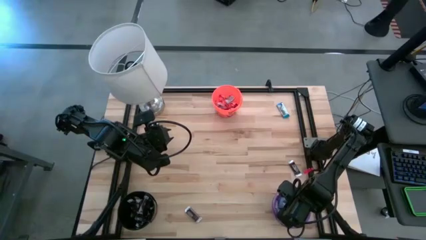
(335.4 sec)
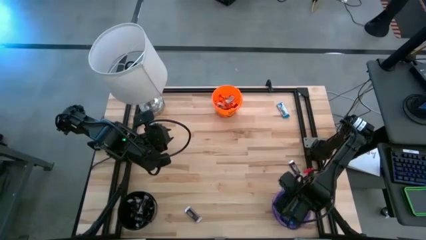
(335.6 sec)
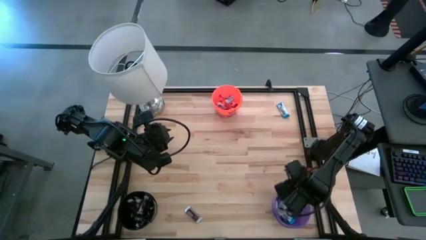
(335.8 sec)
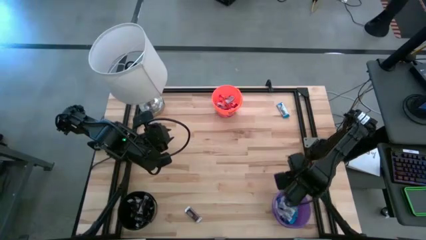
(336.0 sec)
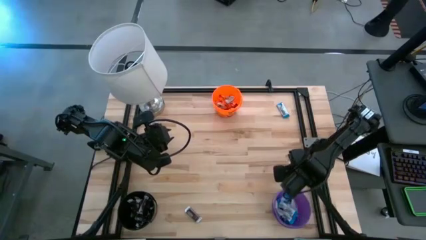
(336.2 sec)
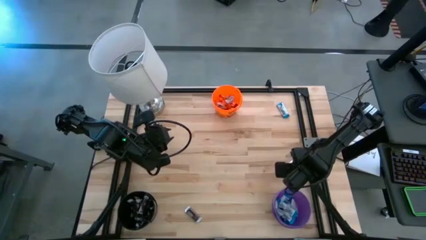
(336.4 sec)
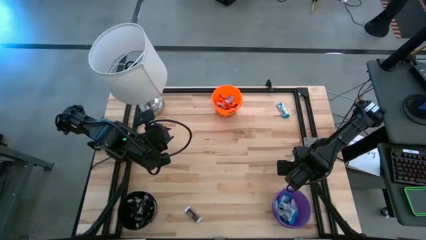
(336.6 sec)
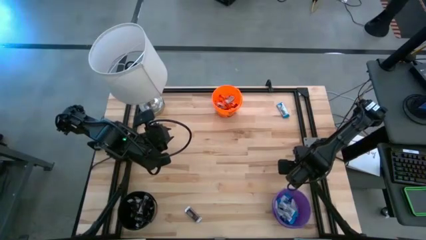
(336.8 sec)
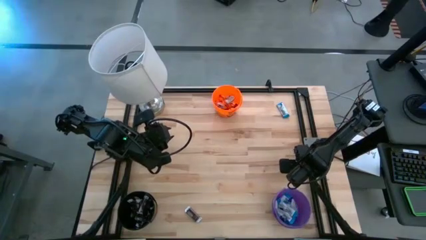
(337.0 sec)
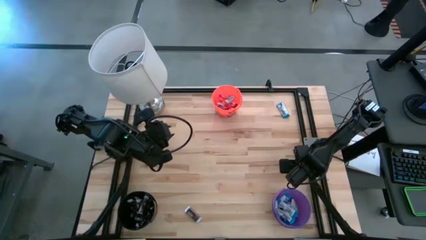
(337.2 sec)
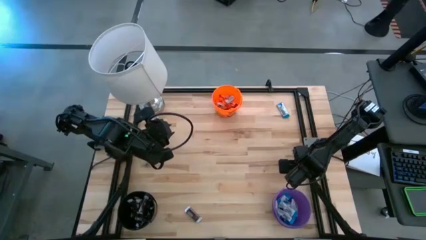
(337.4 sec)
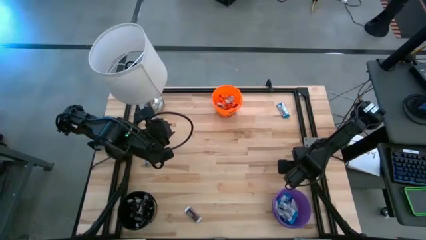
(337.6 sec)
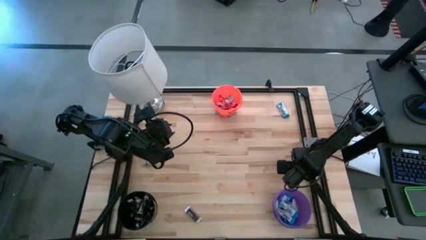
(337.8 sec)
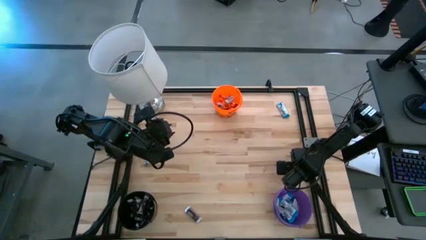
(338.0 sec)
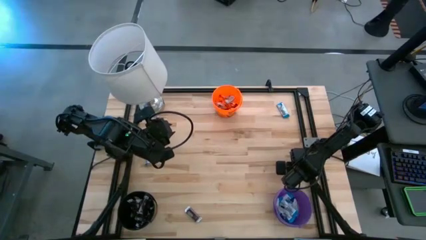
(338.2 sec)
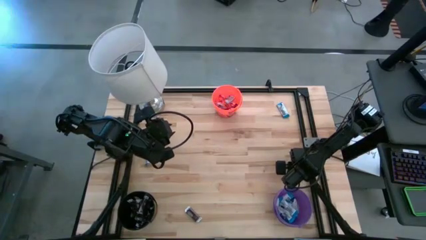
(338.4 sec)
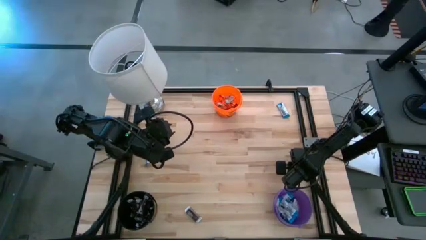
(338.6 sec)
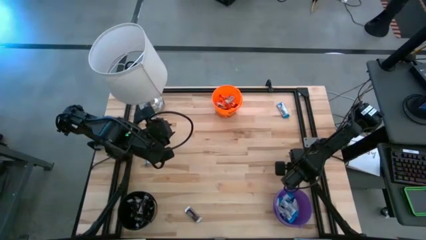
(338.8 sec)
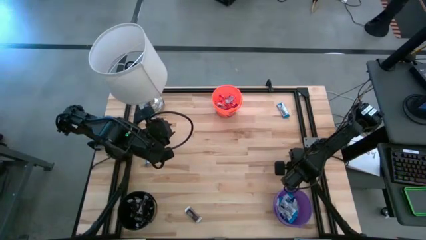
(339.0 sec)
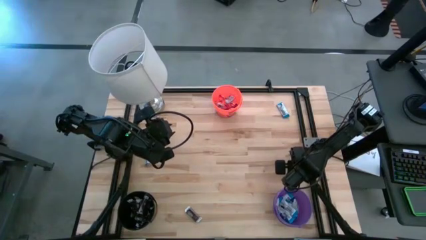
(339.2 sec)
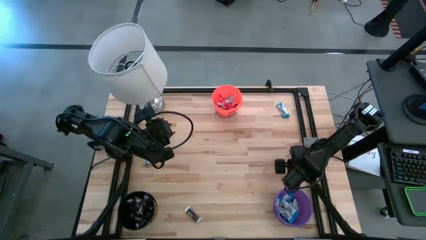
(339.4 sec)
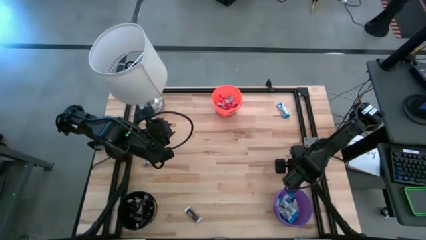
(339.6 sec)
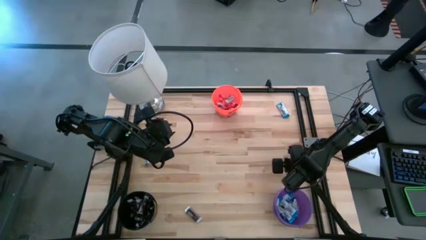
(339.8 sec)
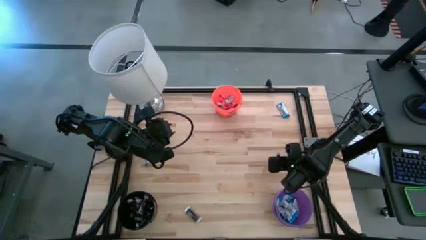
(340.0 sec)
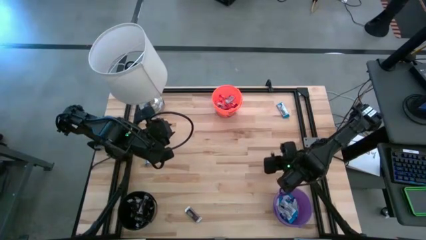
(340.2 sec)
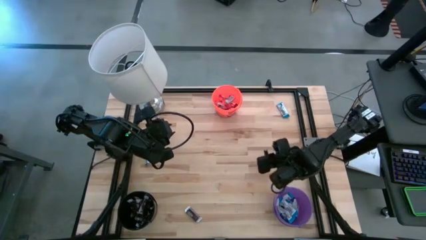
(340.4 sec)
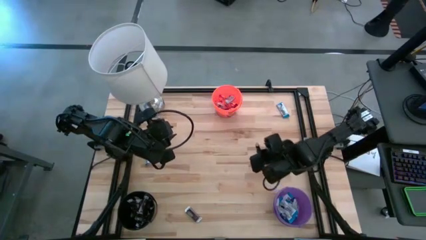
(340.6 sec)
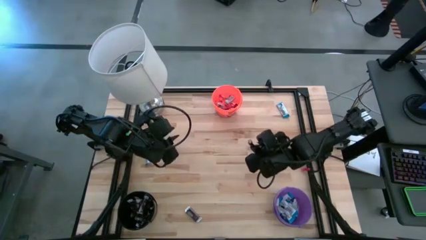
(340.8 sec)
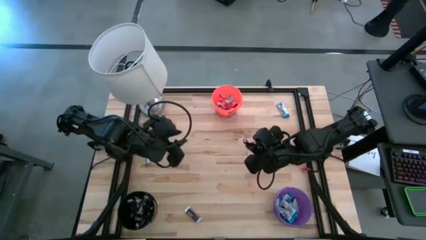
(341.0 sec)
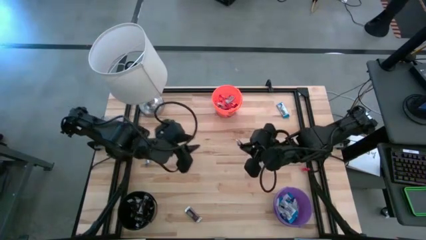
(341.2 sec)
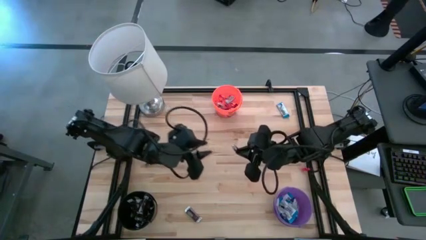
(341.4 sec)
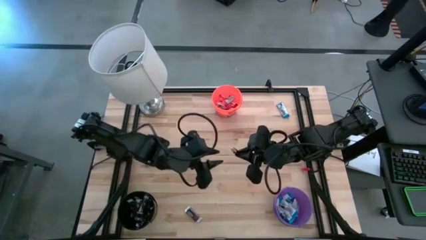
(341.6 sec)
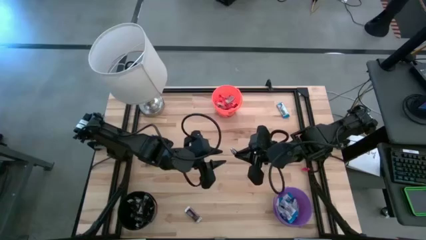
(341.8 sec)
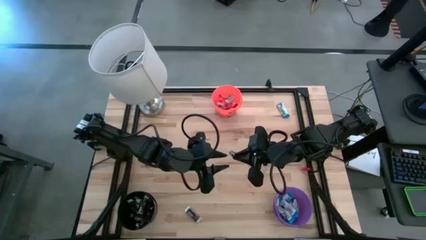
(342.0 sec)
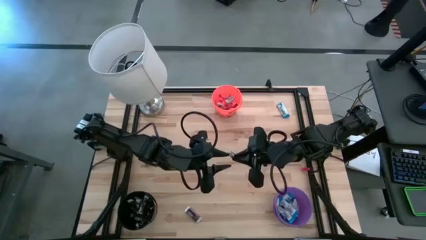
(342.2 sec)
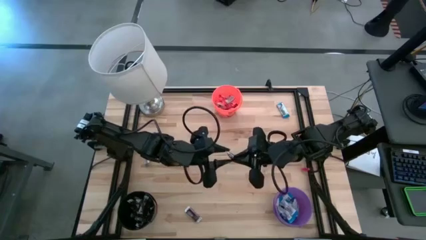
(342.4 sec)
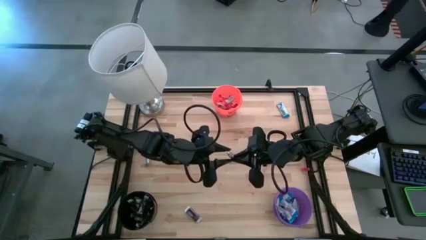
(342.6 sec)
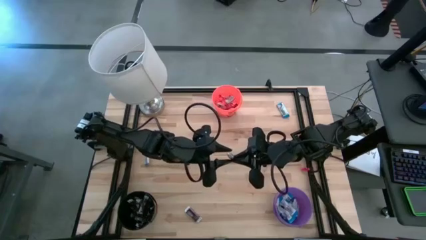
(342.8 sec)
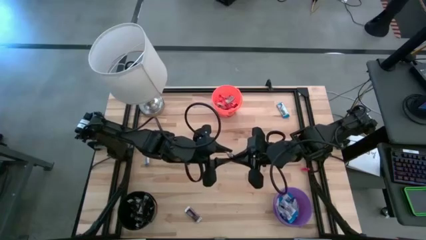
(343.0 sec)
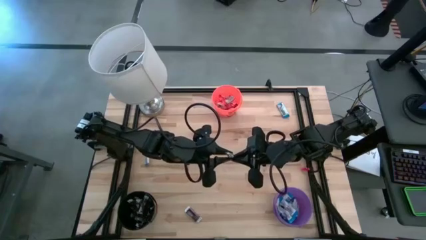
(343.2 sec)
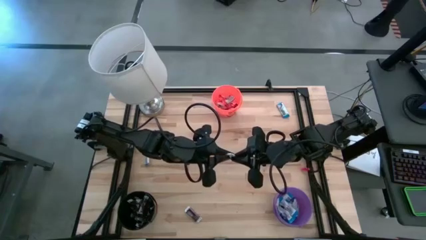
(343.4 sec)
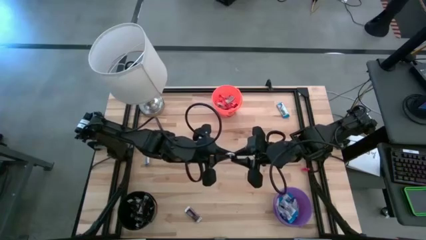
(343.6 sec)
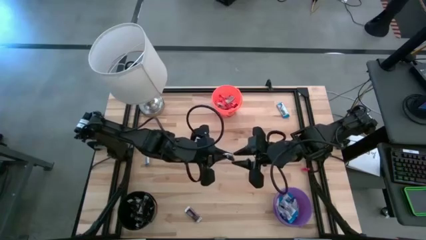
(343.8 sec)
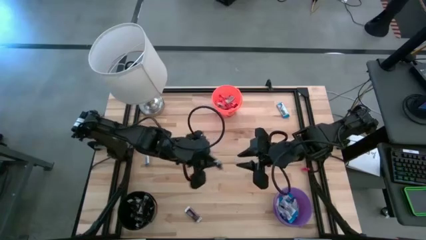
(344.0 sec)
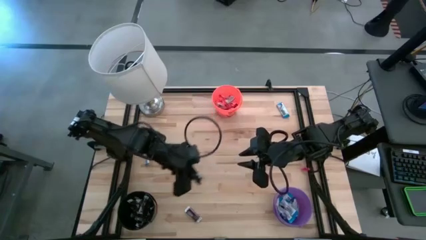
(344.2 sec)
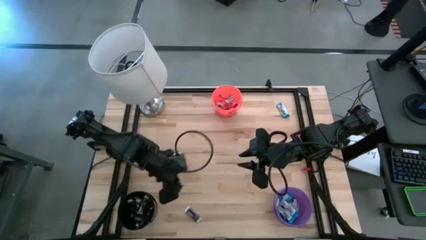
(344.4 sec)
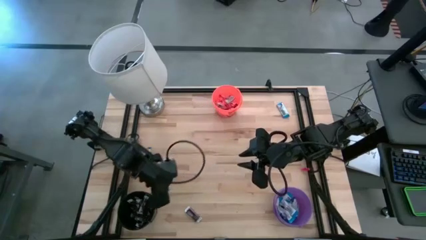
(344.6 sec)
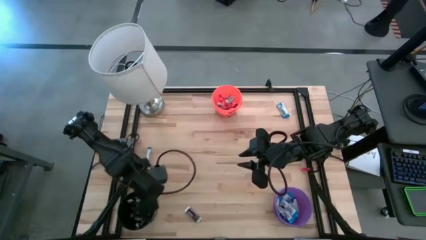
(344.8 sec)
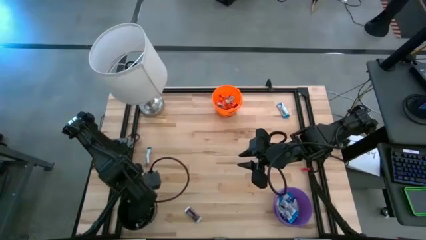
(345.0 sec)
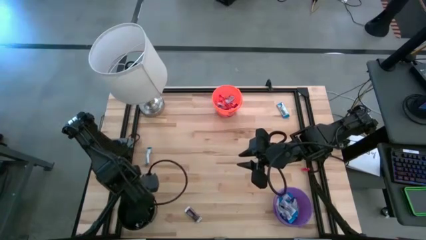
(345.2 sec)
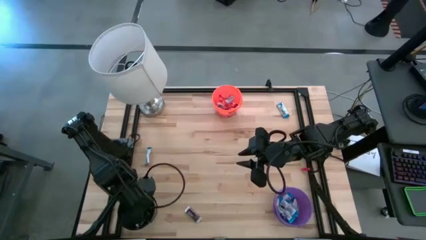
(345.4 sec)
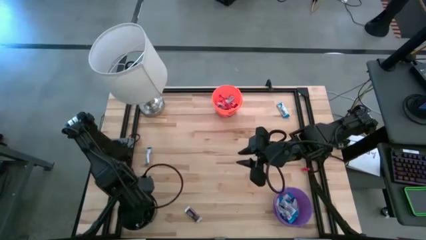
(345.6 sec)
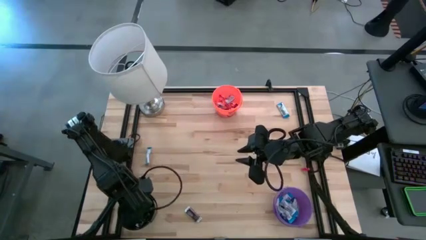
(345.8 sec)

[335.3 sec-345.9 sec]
Task: Organize candy in baskets
Put the brown chocolate into the black bucket
